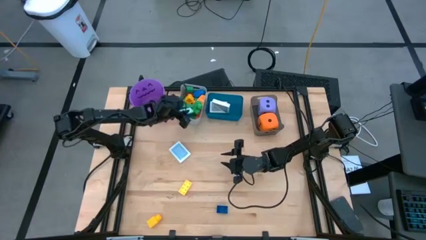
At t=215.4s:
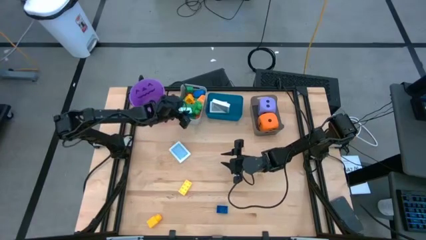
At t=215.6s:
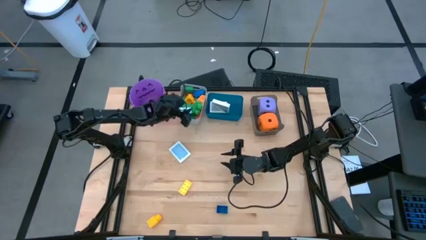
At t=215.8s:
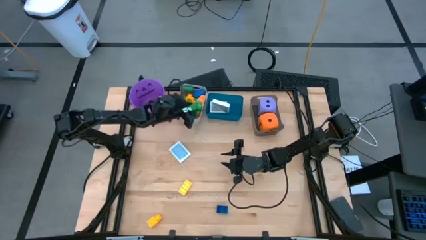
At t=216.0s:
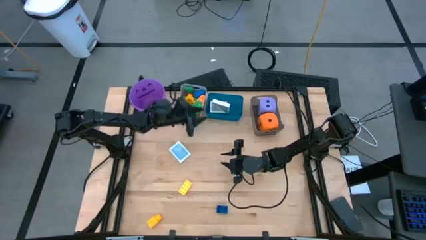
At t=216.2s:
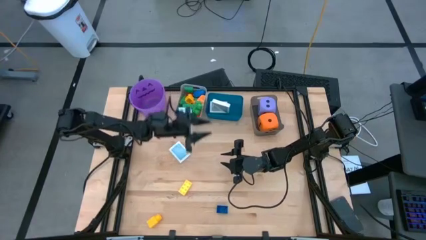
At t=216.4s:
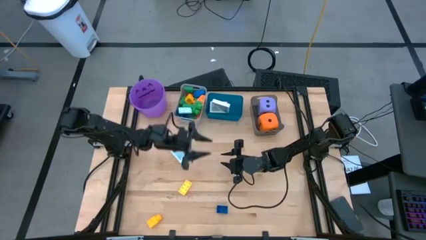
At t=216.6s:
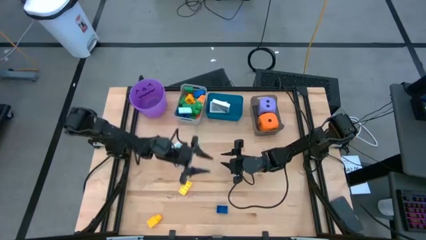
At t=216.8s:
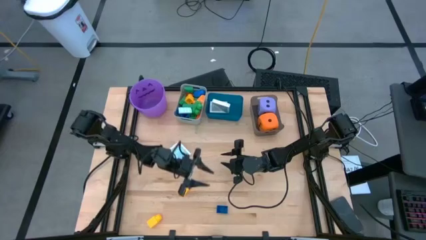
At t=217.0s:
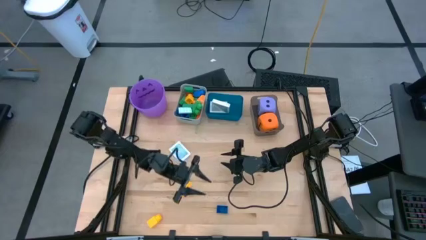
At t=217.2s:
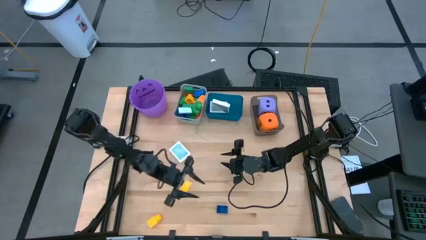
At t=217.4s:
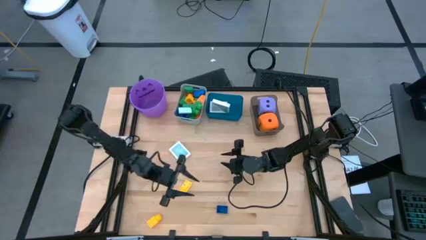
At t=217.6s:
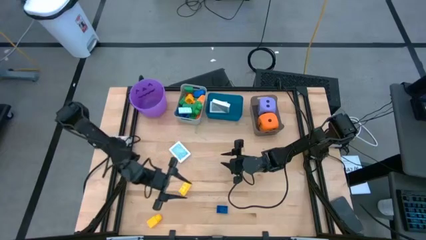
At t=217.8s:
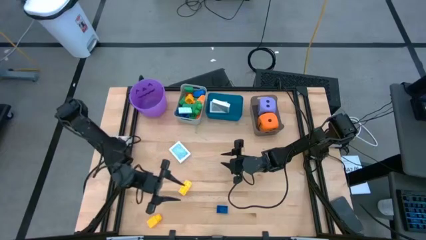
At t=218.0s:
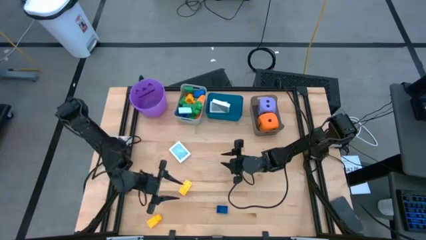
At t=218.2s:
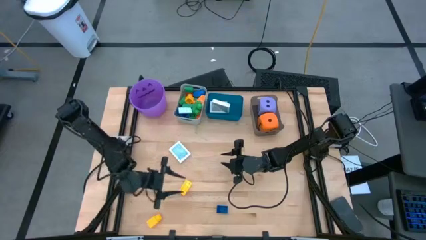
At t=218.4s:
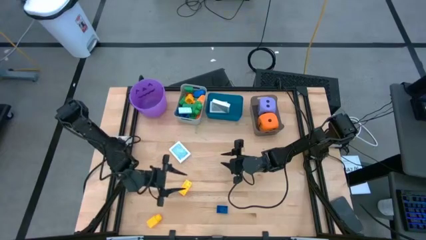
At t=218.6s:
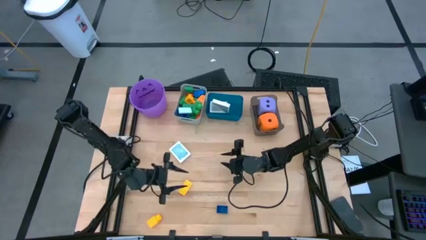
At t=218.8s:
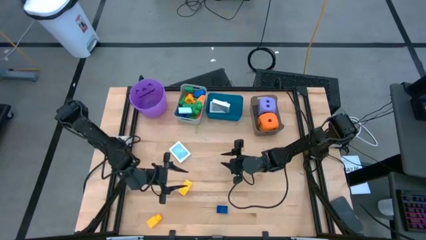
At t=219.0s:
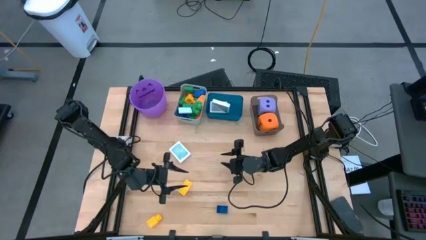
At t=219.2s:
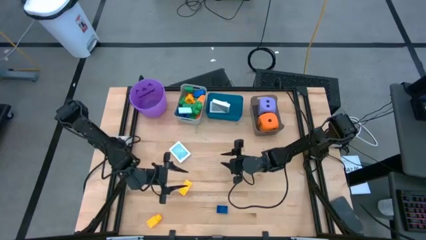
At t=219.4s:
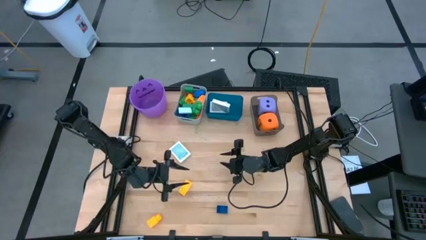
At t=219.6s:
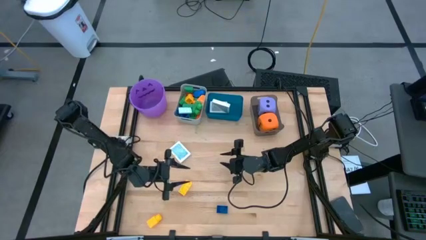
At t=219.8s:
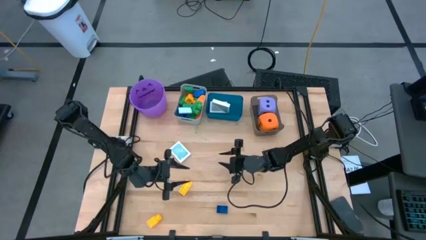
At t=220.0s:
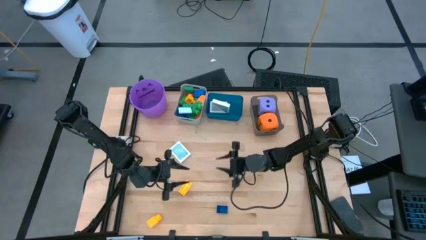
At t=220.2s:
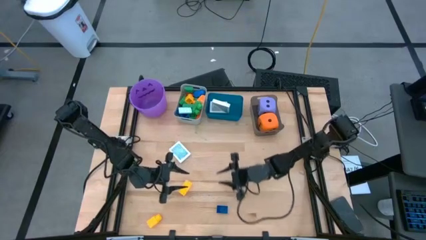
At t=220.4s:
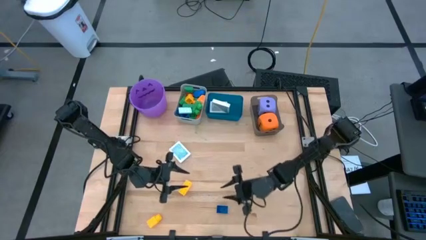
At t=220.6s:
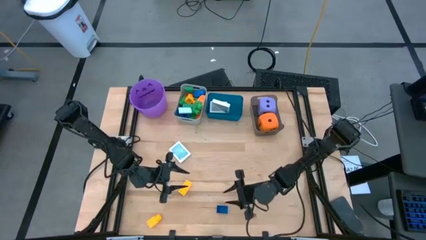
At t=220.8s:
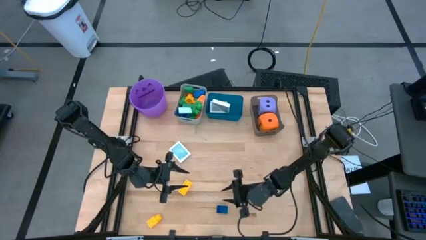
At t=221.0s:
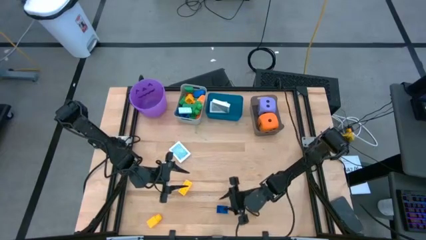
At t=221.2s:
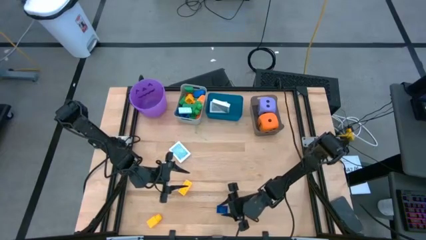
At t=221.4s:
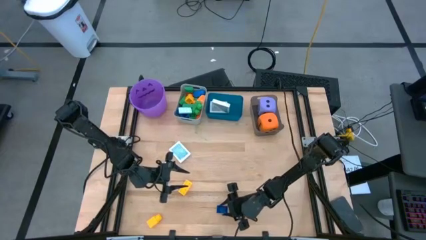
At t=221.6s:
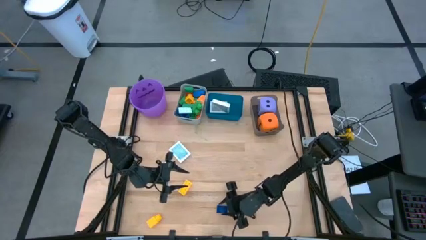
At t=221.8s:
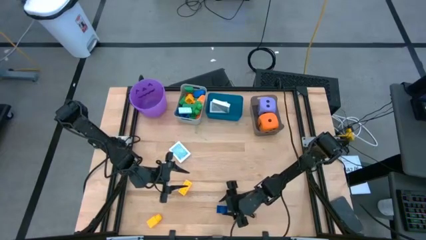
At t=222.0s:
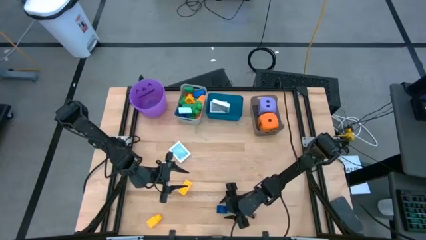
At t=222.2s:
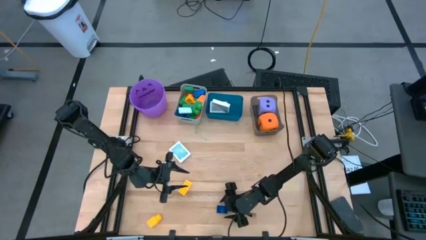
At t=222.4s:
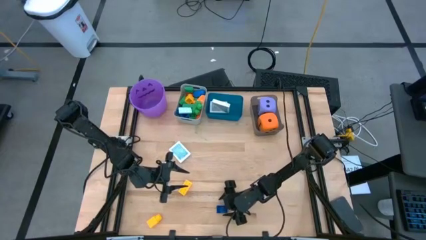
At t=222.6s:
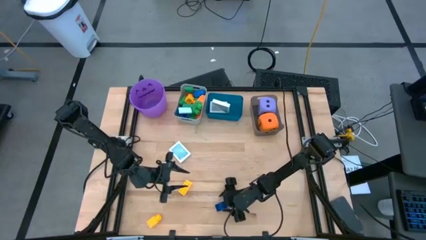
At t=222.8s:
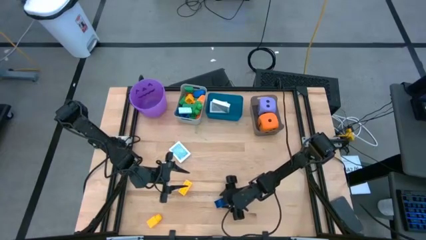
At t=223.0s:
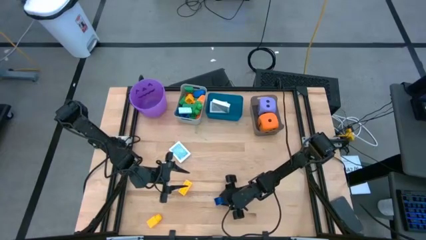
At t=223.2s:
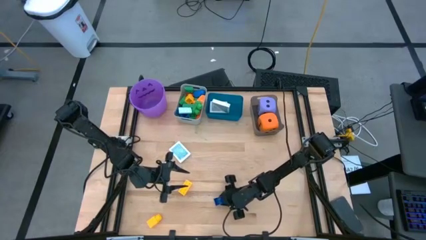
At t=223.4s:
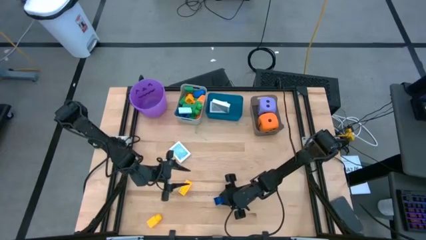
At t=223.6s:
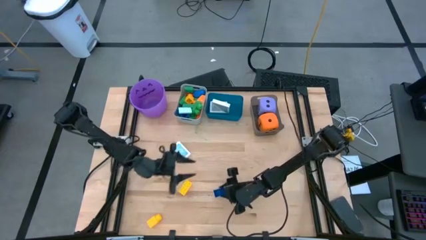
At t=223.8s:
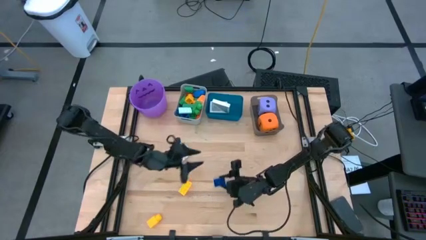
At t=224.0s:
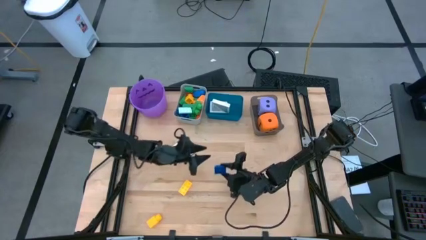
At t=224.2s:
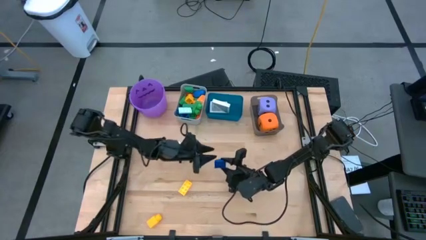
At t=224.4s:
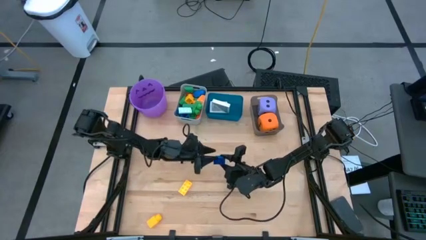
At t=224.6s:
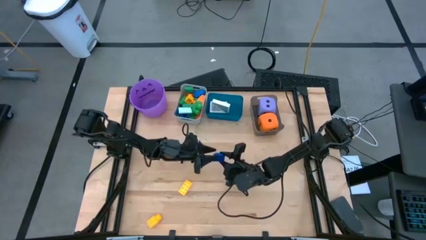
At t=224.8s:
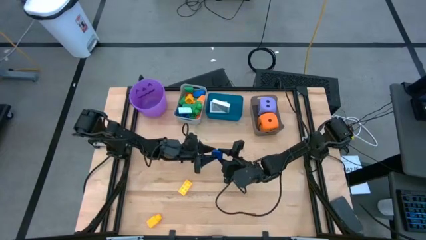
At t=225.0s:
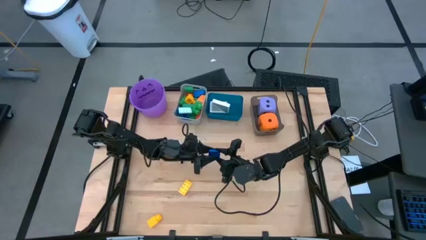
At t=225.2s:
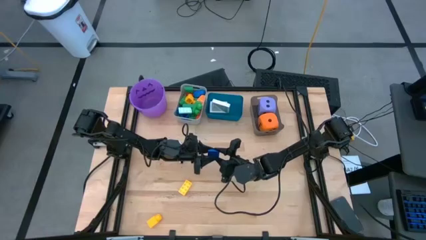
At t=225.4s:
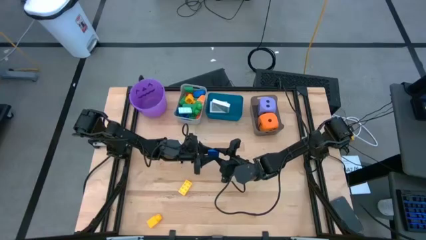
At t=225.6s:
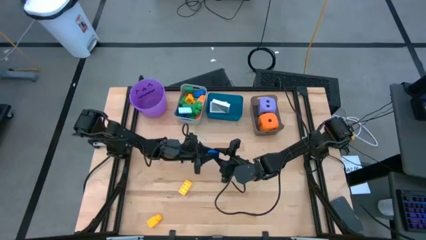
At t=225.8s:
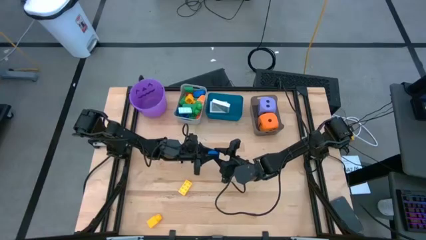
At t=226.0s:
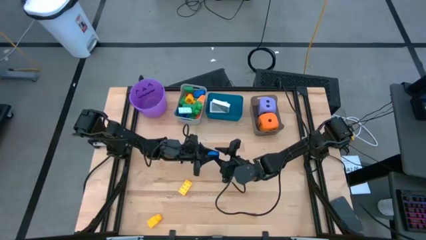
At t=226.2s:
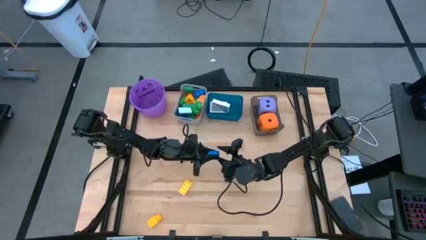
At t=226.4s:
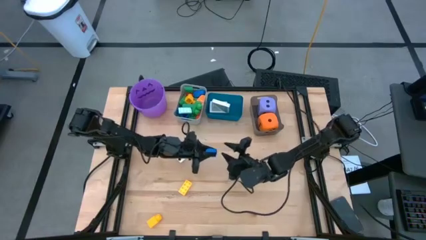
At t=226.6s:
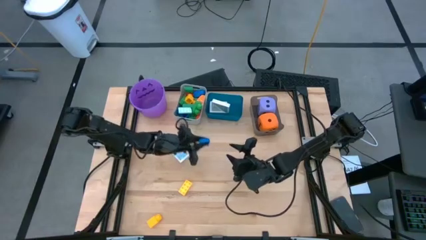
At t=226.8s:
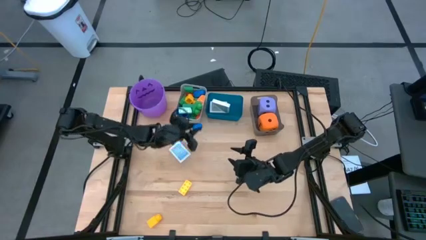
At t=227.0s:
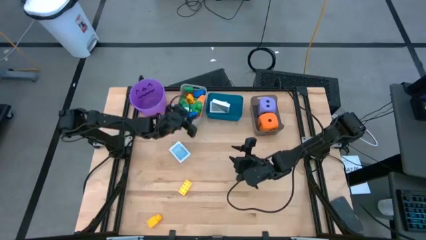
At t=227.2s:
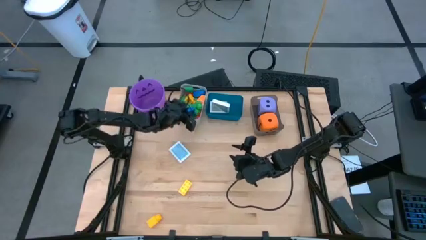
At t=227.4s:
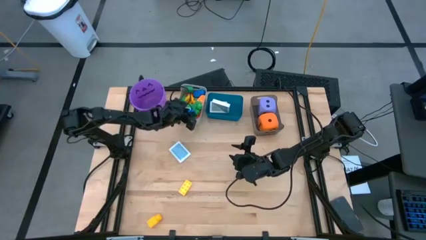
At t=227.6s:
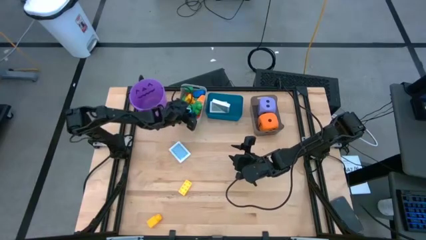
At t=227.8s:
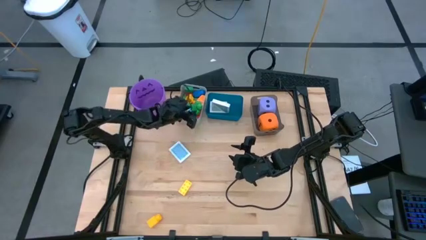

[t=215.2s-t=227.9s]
Task: Pick & Place Toys
Put the dark blue game piece into the gray bin

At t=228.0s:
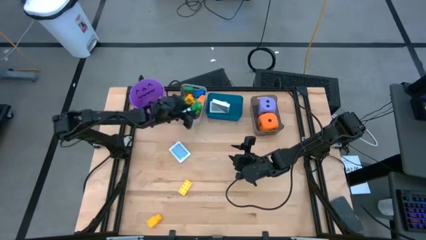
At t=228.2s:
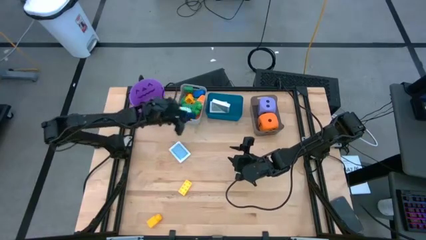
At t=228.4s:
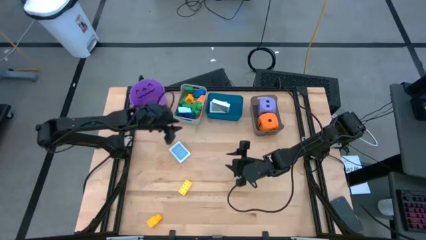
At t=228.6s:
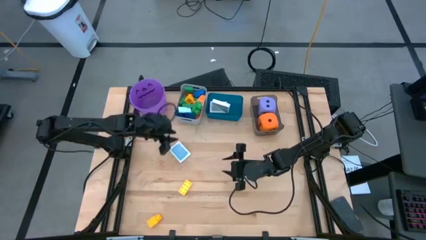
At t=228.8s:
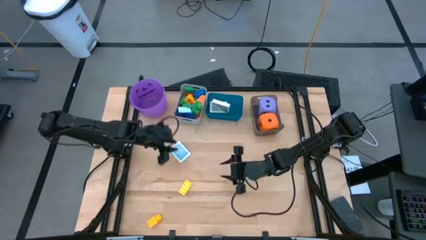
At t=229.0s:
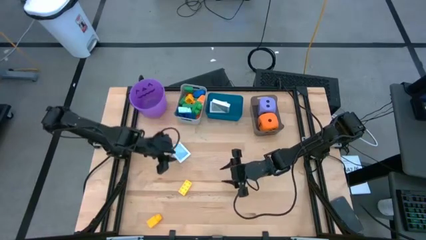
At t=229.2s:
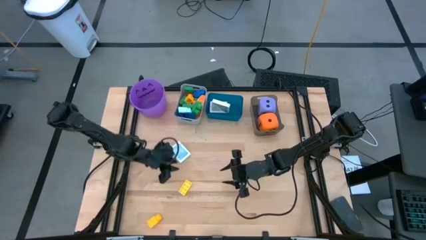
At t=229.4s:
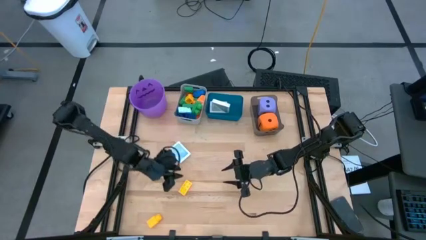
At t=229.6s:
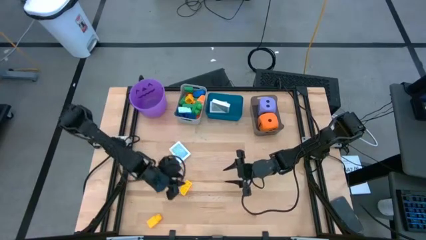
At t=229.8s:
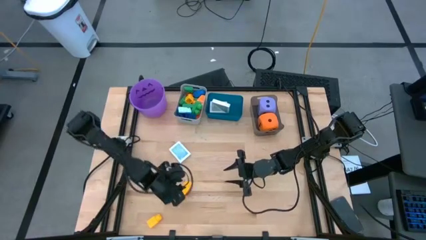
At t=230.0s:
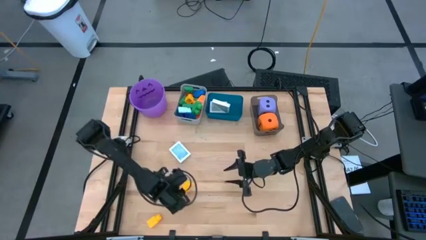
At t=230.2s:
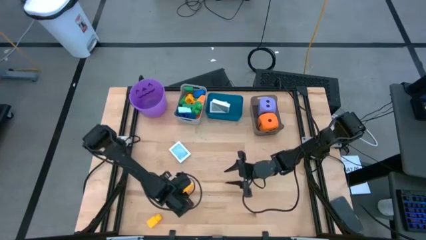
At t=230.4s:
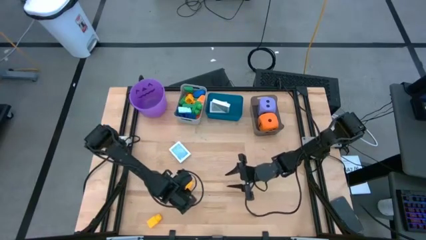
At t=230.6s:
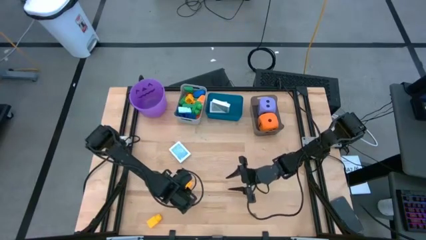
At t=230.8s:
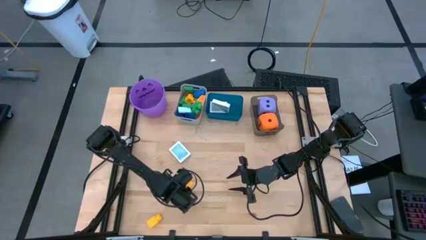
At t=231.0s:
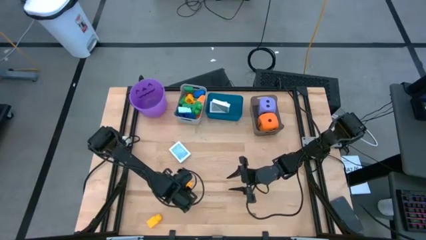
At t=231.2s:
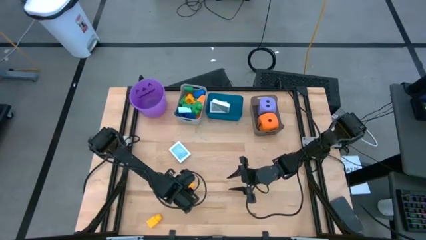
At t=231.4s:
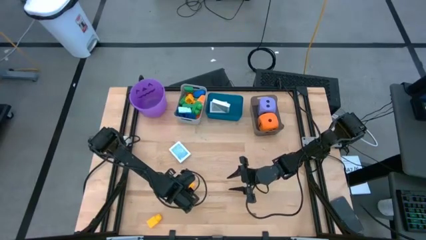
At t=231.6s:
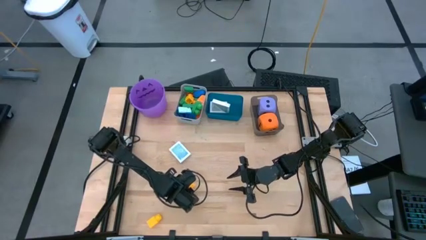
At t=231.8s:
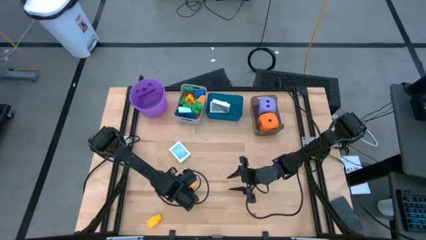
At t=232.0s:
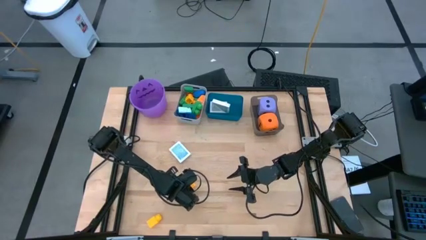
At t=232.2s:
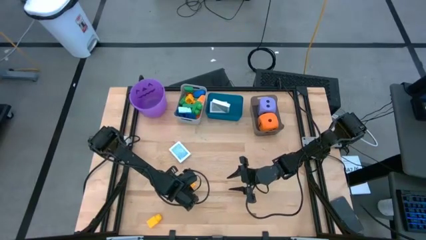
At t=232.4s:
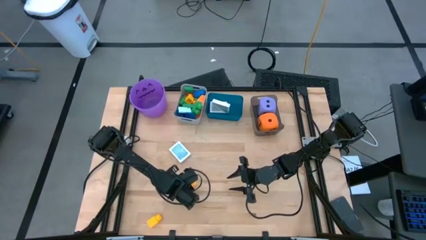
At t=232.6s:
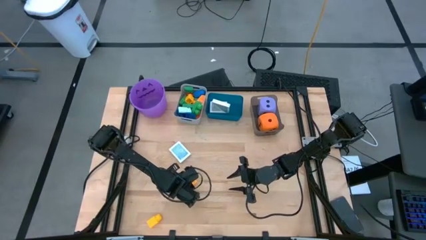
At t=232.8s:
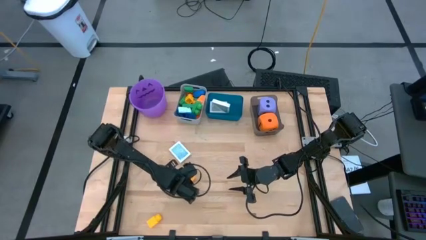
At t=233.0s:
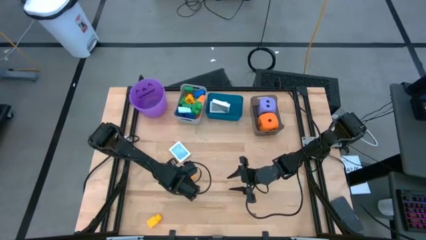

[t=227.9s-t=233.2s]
Put the yellow game piece into the gray bin
